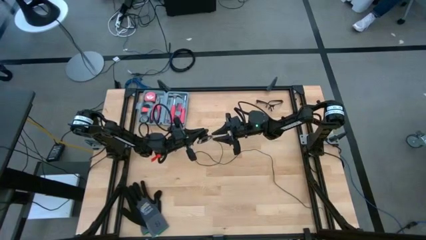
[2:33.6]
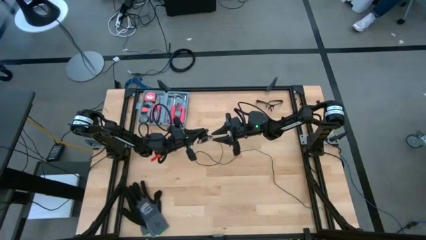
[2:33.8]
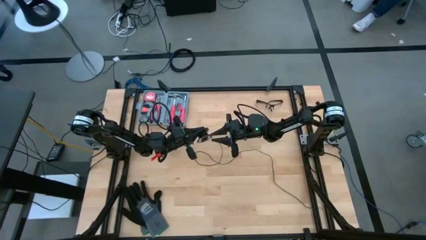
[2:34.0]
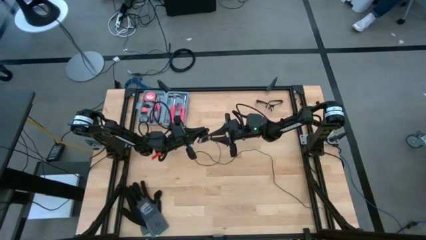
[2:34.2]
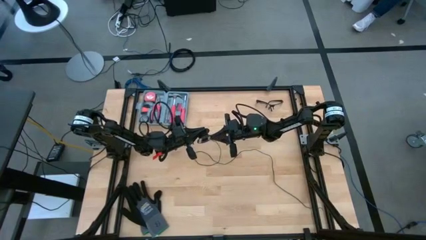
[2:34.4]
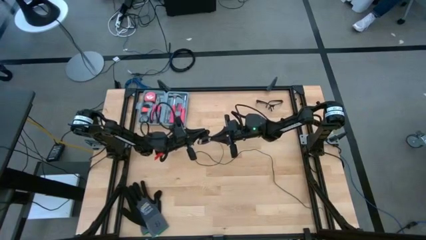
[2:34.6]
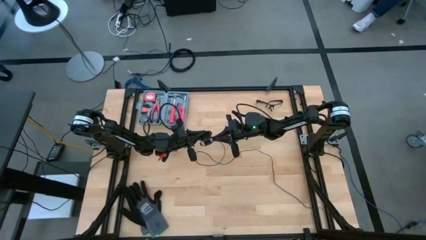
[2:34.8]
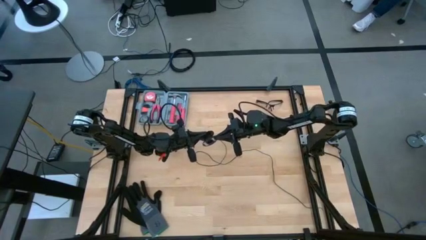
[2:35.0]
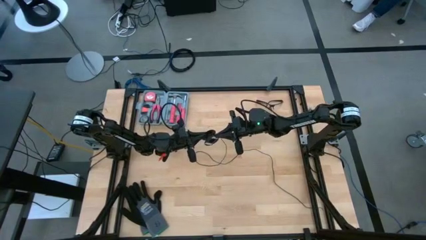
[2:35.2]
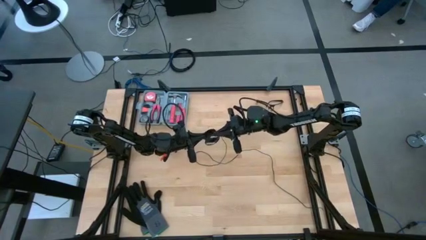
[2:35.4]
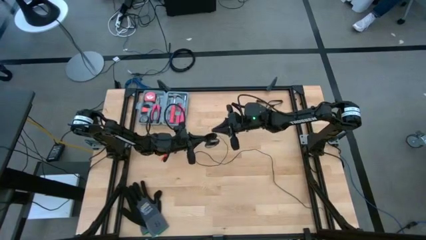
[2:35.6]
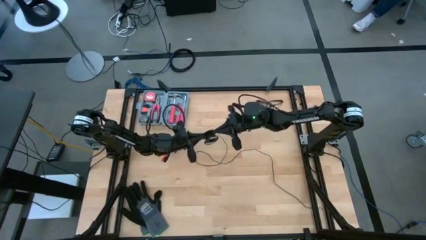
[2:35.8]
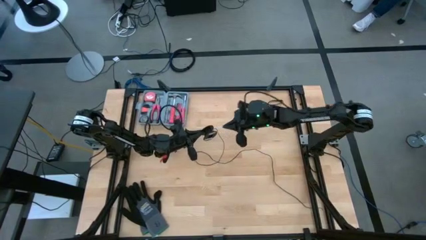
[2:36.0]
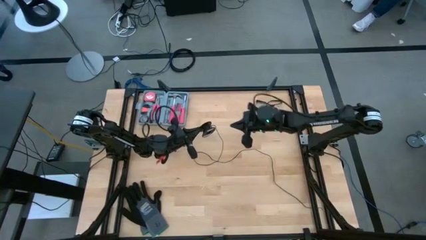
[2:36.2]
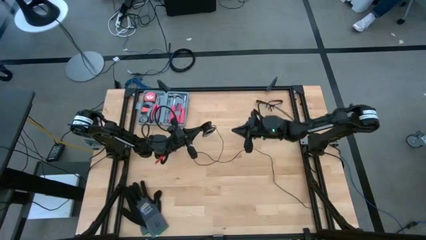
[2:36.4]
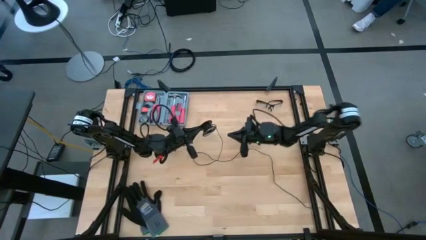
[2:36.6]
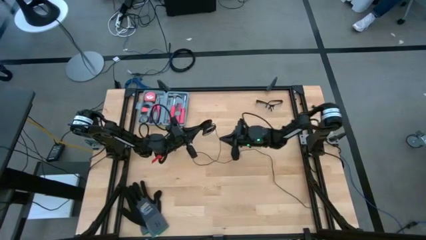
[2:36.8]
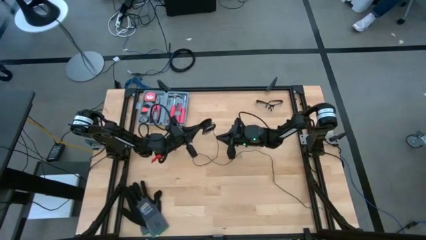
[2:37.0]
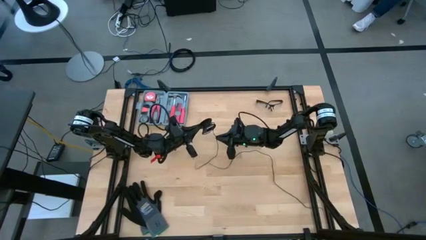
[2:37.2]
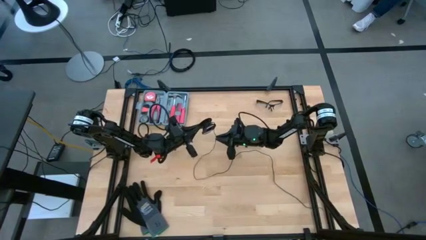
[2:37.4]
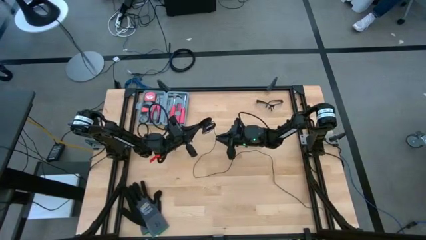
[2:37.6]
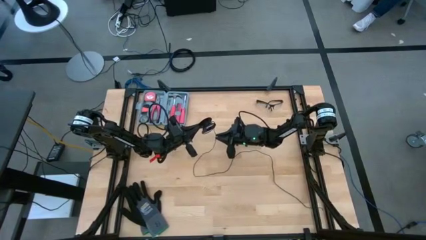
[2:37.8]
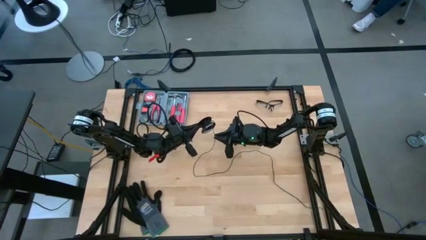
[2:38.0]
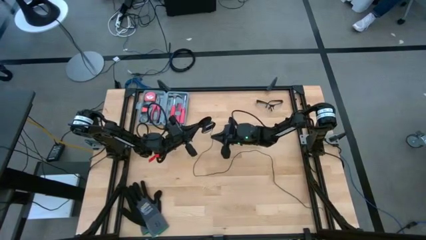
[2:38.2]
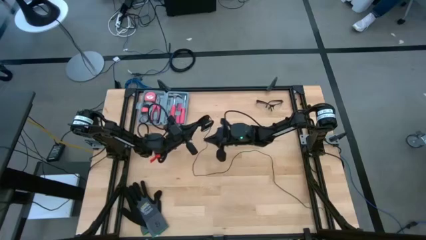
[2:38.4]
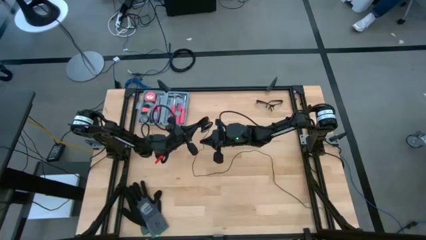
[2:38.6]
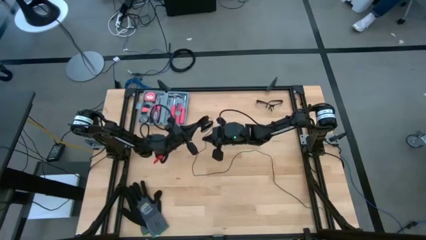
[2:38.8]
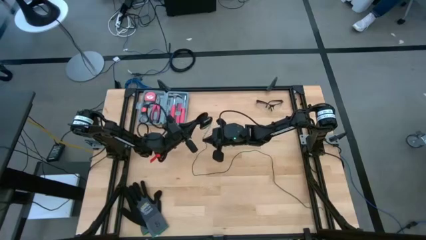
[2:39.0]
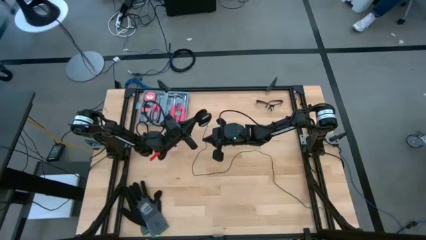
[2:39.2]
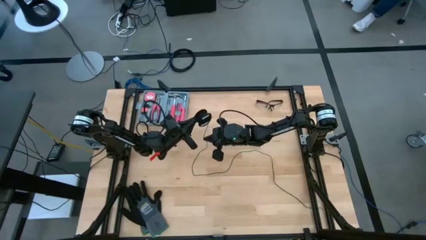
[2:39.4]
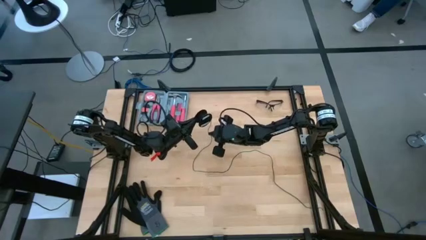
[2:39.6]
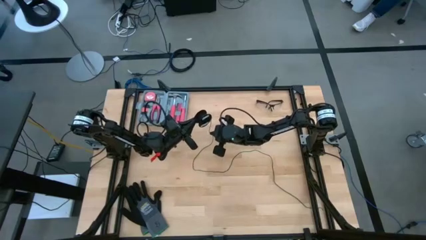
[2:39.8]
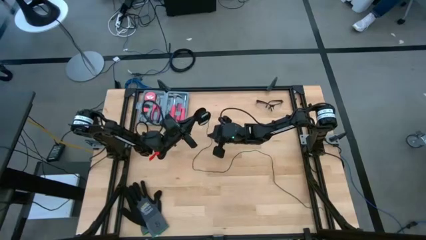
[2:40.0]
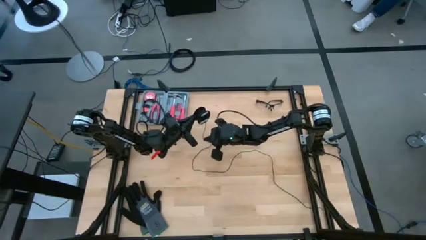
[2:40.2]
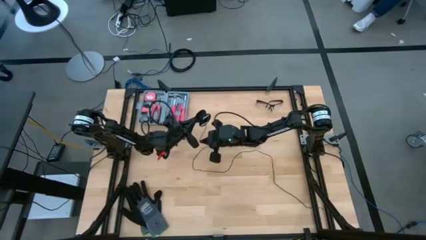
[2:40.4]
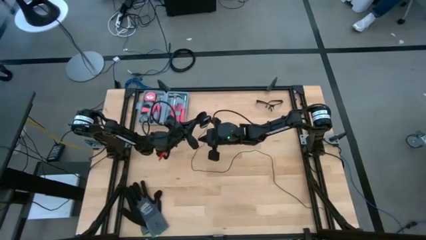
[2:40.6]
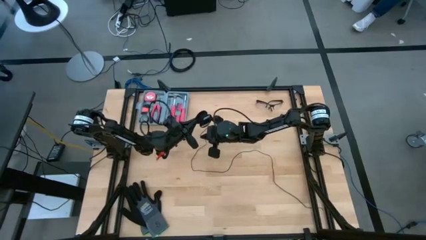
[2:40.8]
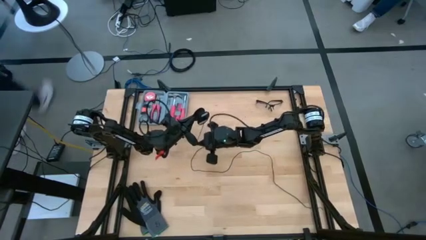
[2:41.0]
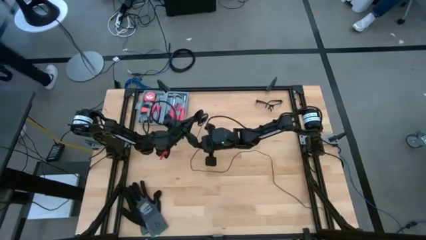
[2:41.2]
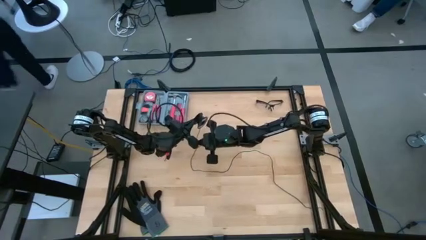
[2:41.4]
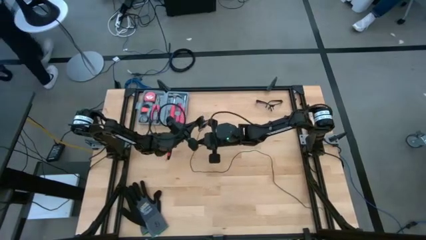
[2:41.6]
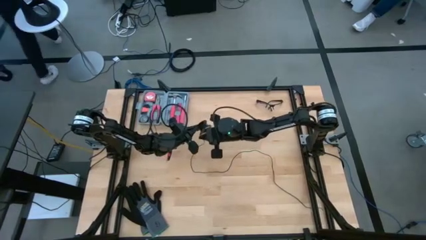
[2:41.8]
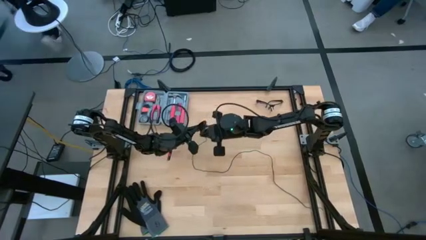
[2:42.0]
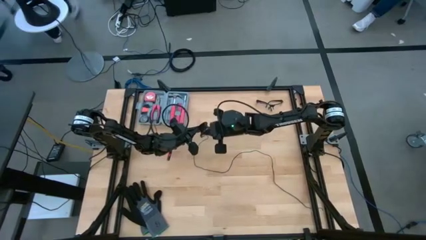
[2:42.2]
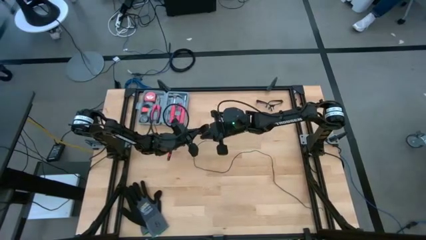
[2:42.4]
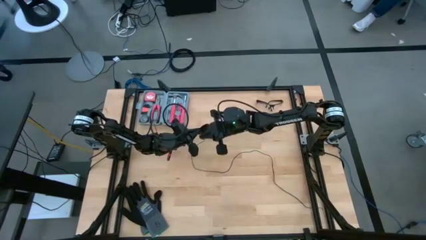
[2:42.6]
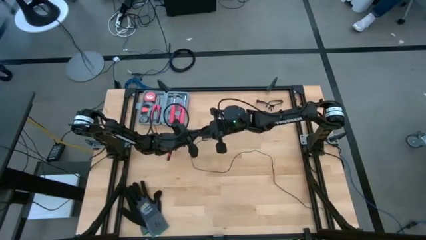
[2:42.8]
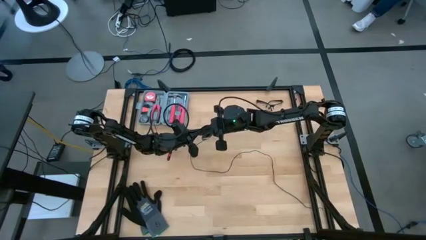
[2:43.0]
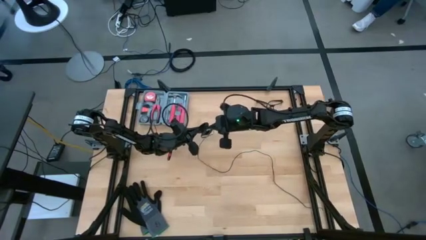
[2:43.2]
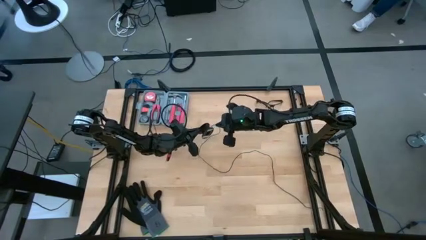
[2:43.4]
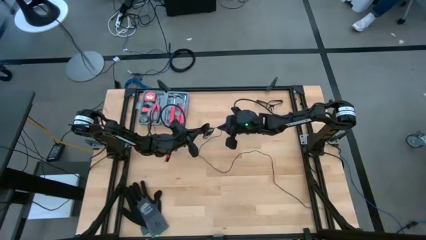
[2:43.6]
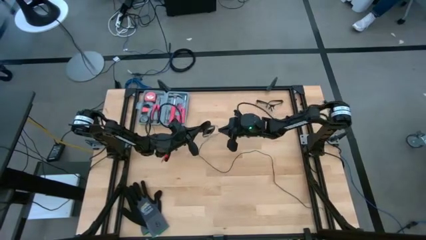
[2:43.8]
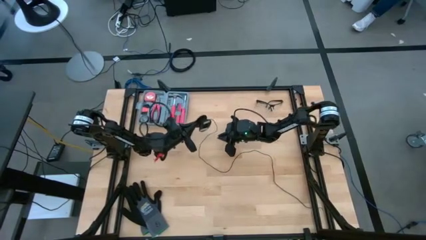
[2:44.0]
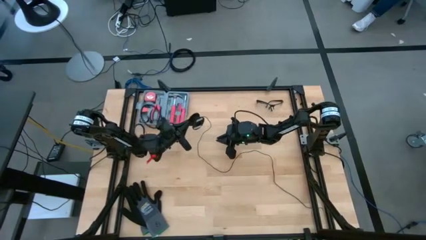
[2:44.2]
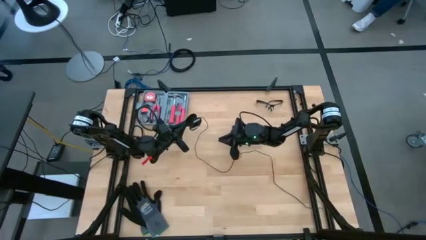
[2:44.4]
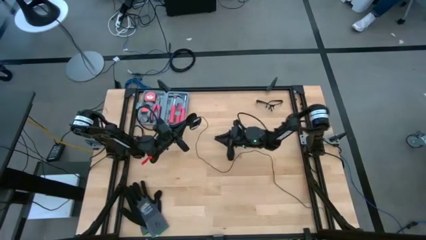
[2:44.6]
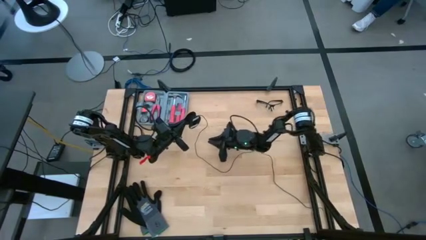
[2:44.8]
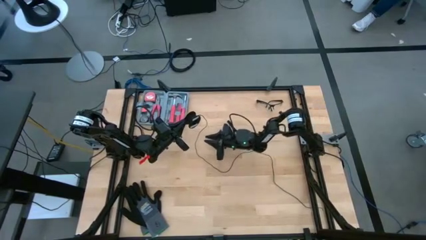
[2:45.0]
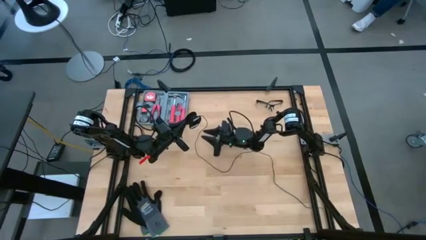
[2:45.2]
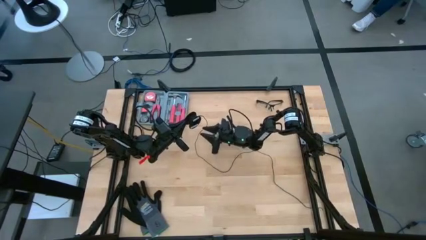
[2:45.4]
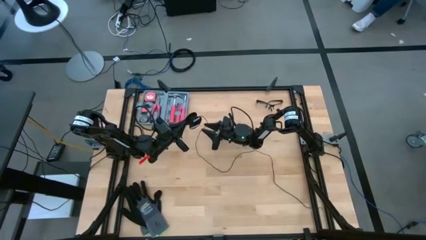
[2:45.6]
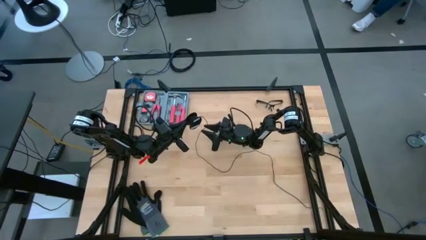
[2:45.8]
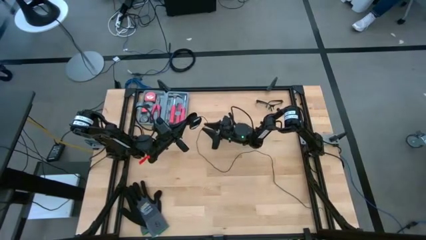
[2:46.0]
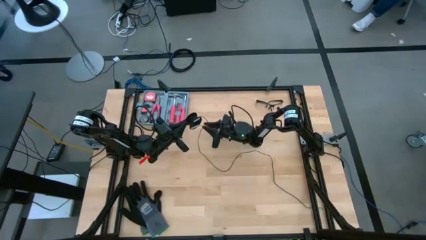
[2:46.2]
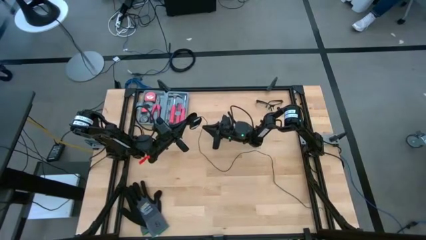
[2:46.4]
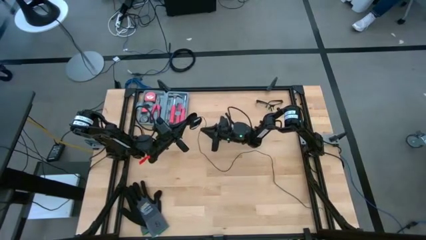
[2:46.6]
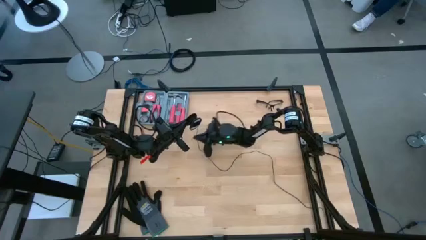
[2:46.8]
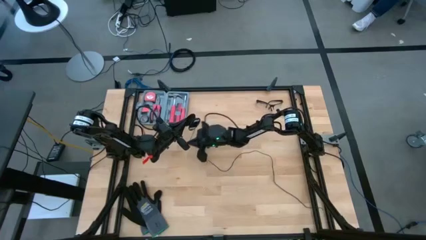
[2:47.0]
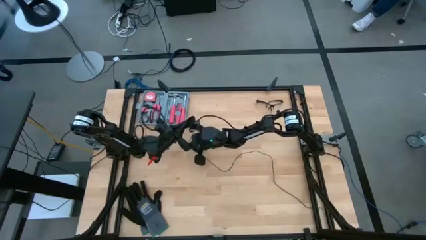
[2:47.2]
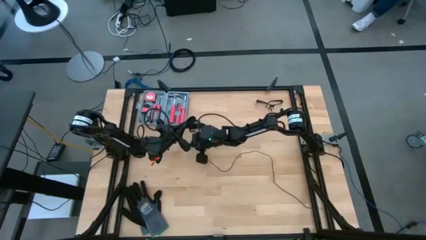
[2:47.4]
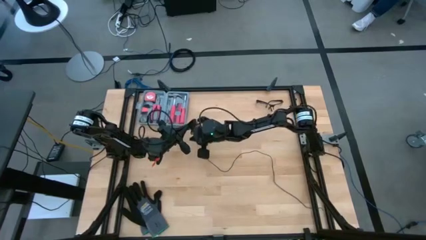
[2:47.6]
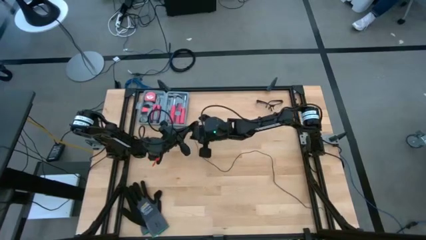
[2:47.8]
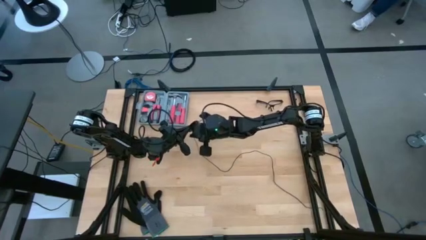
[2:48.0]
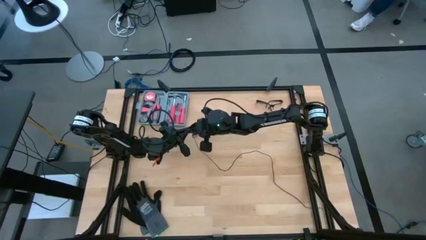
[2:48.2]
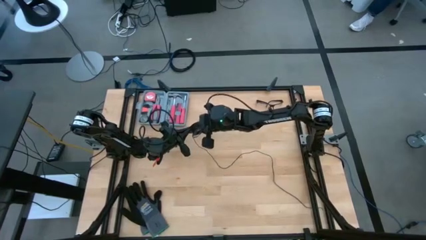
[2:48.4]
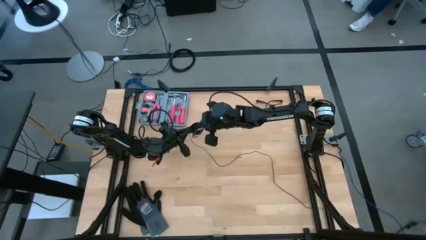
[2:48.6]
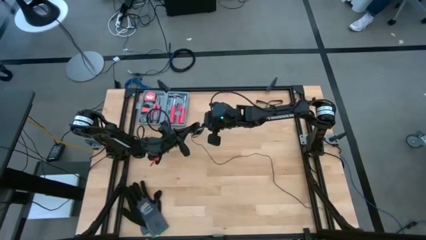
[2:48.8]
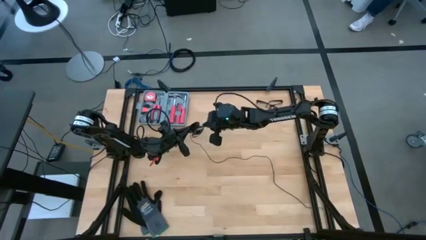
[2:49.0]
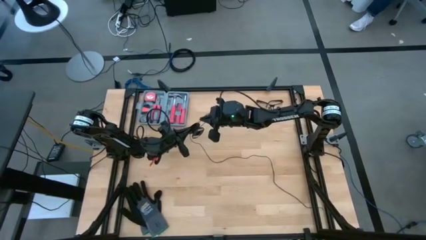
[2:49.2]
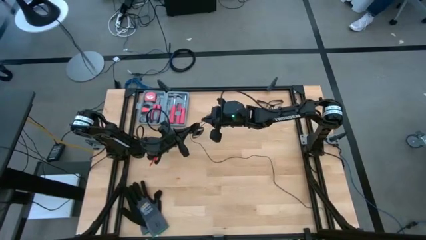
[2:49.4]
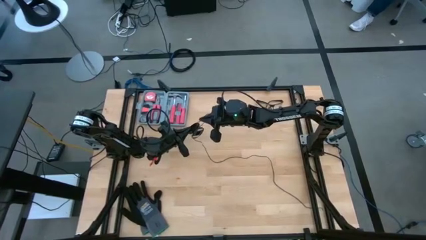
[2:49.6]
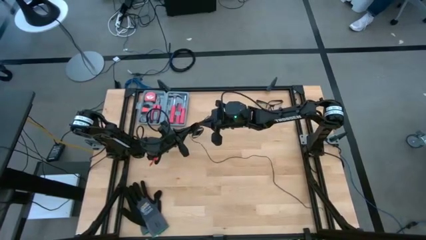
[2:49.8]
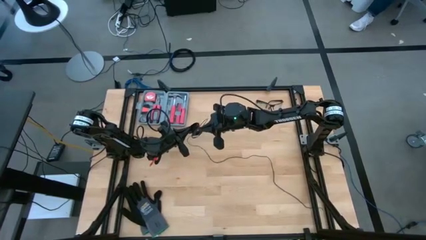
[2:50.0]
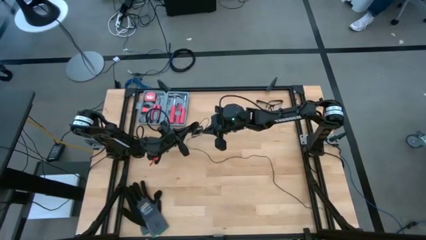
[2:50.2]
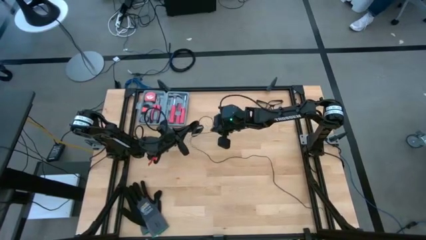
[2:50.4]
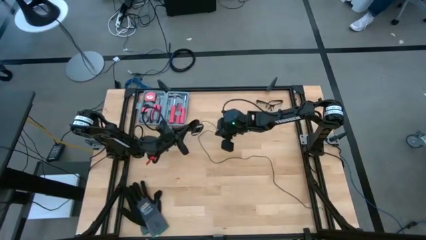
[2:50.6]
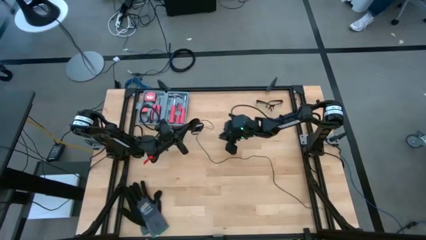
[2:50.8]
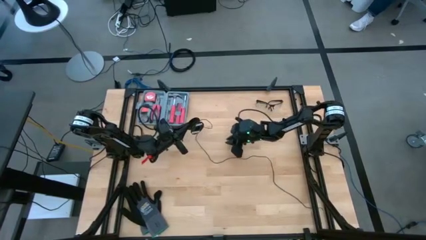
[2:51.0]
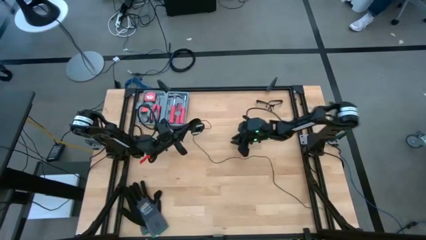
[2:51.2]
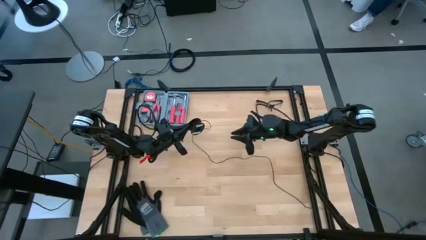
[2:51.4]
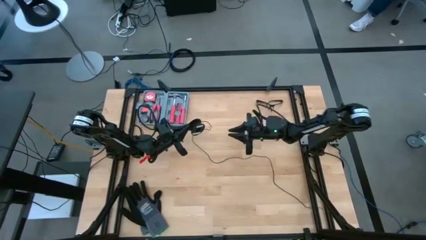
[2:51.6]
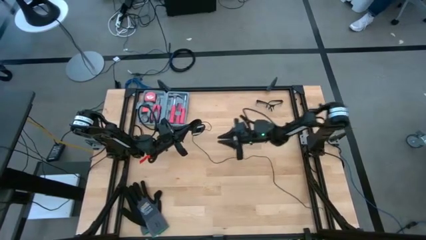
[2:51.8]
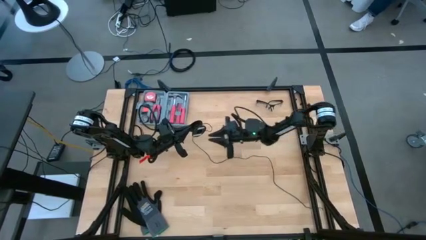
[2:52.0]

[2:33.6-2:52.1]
Task: Coil cords
Coil the black wire on the black spool
